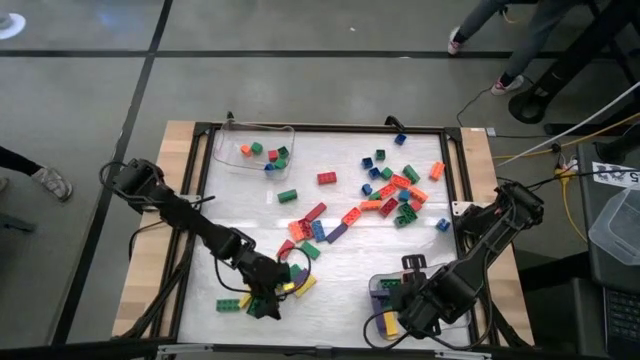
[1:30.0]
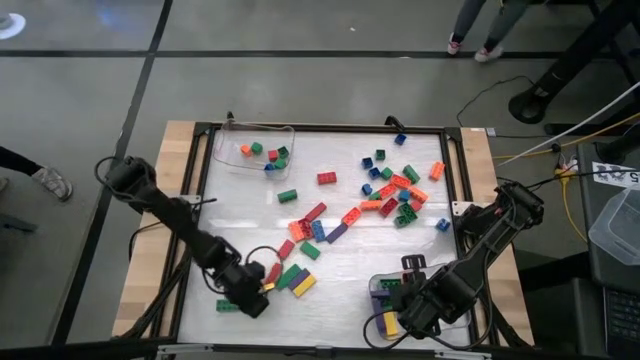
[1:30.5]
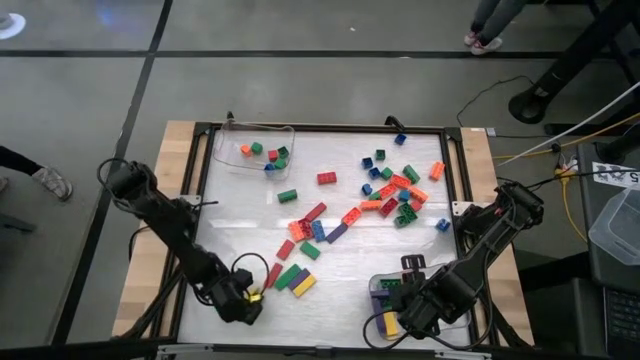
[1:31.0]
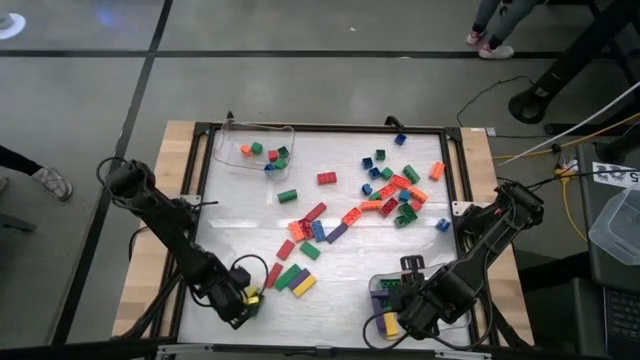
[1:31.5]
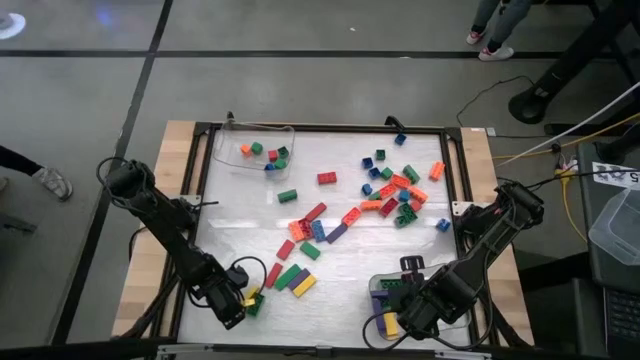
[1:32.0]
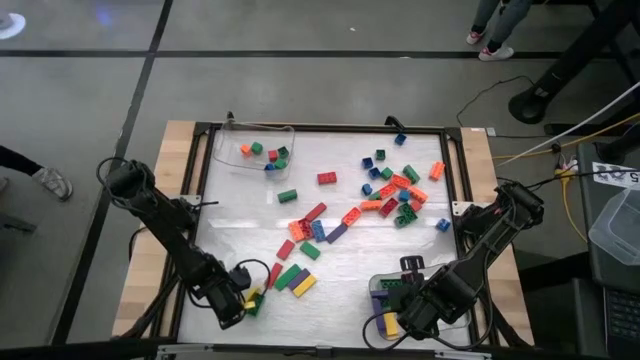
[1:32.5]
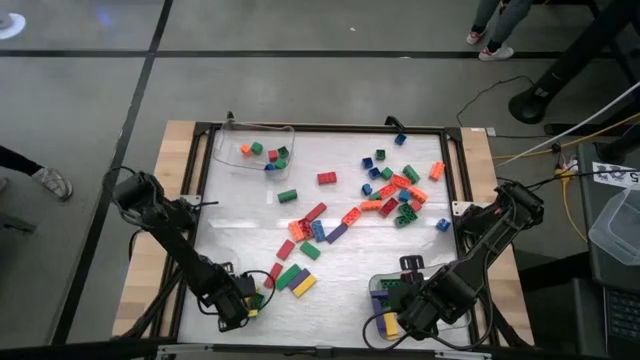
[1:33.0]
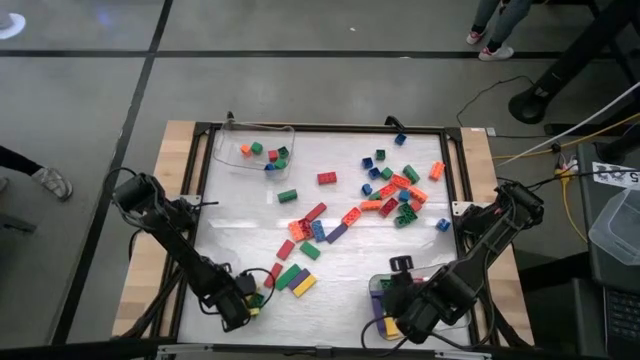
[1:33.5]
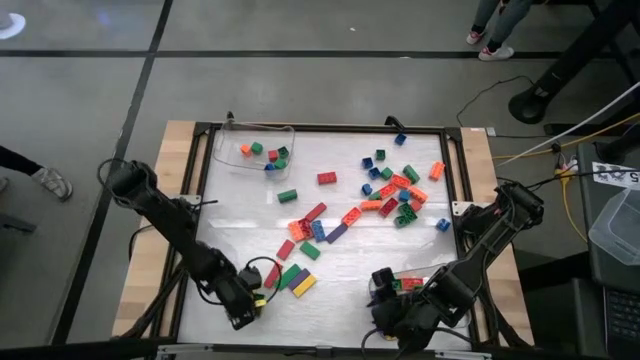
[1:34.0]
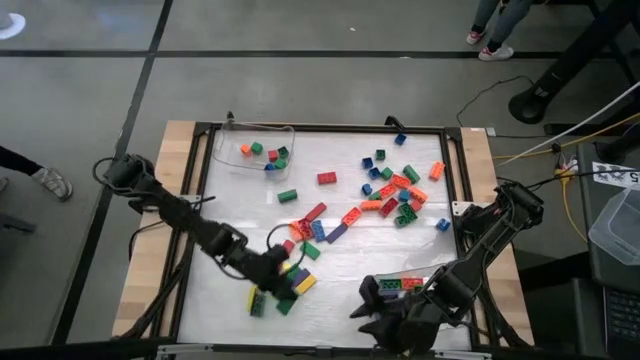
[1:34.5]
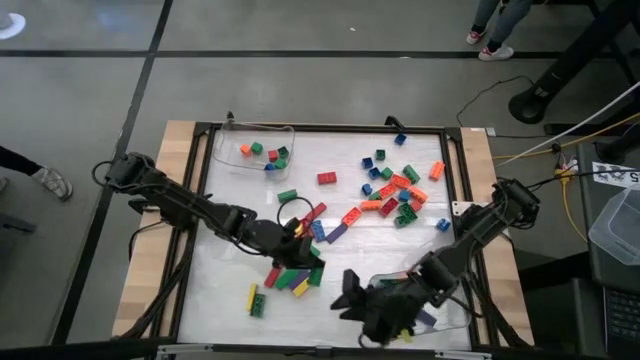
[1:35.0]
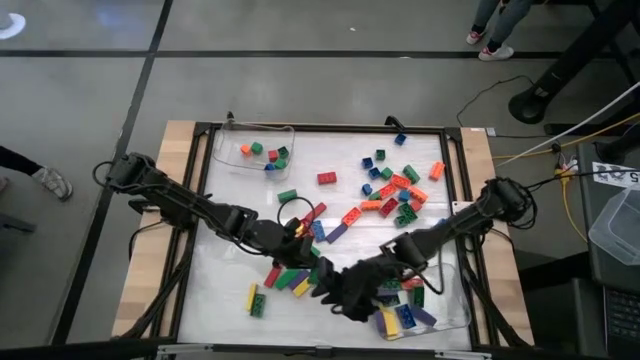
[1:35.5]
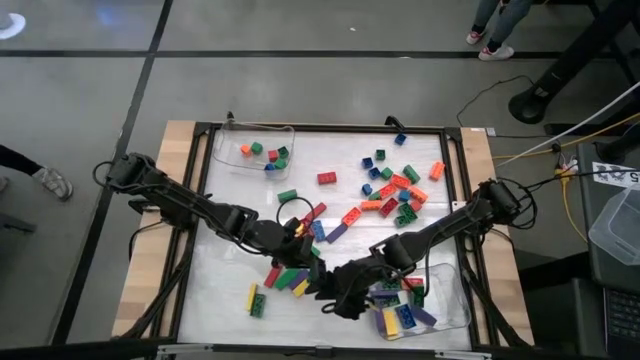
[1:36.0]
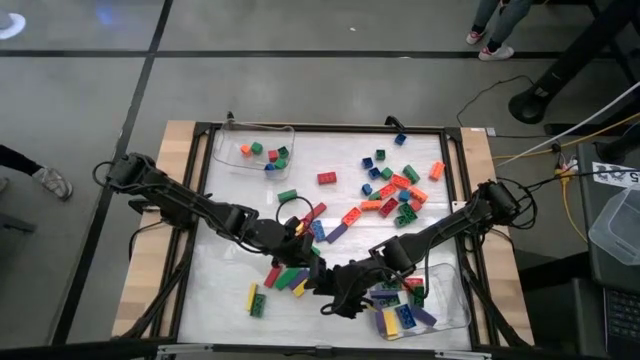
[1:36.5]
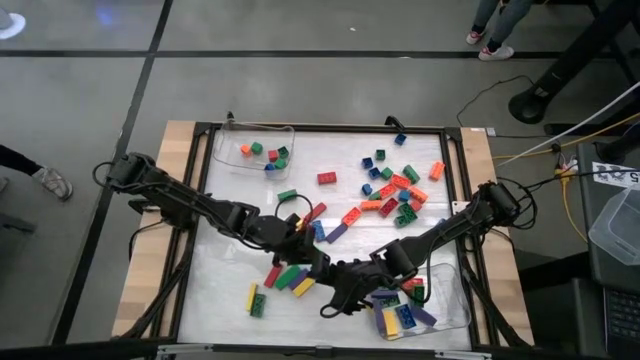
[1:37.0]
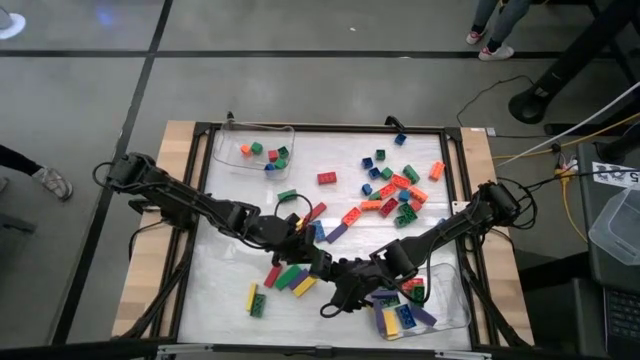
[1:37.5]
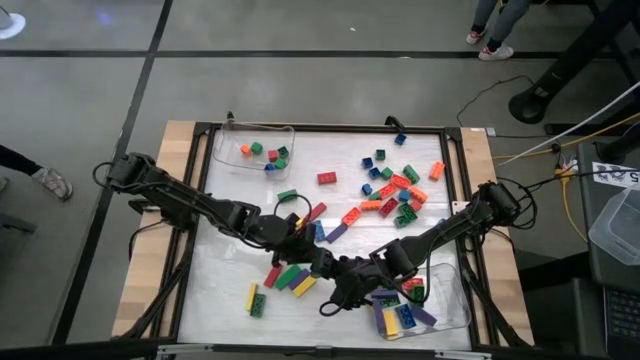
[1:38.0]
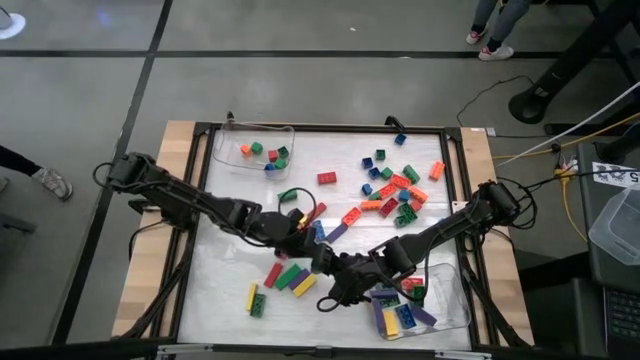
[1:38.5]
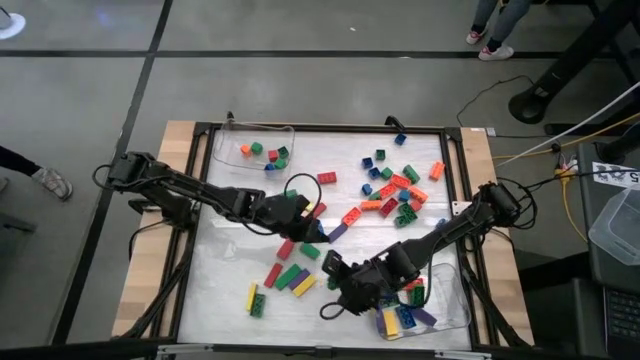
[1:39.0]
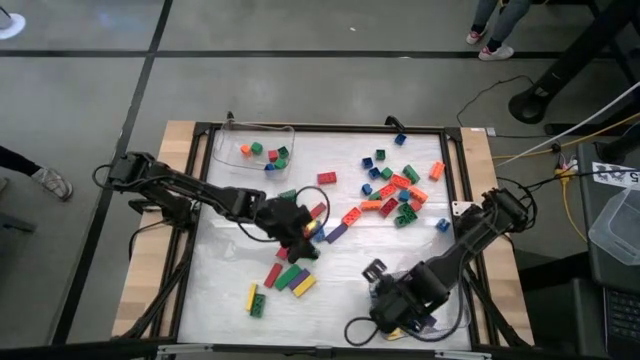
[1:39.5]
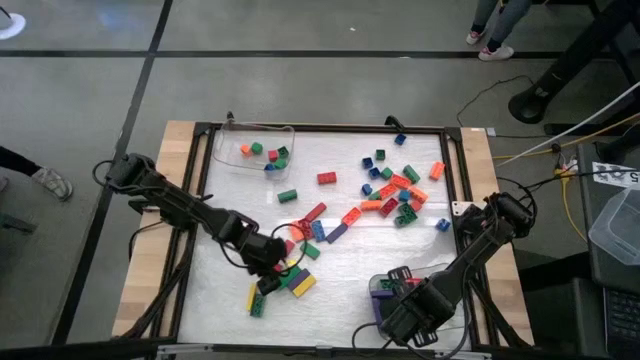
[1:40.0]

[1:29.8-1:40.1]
Task: Sort blocks by size
Put the rectangular green game piece into the bottom transparent bin

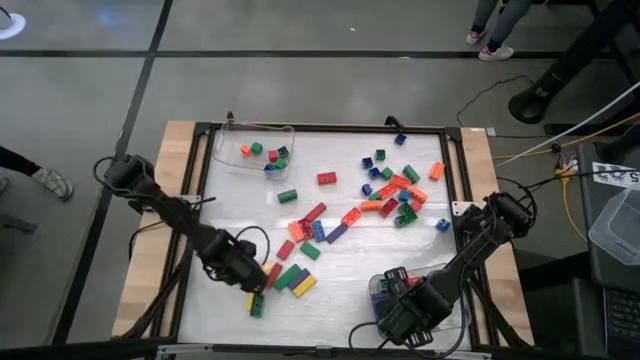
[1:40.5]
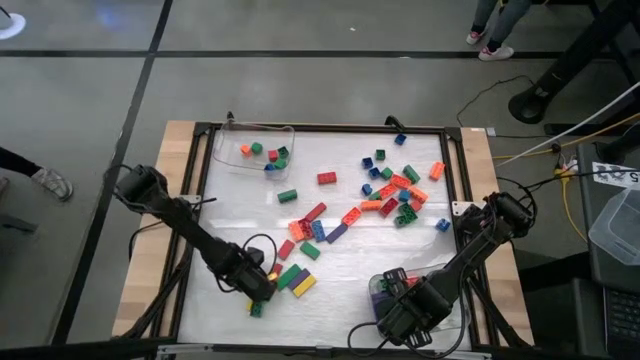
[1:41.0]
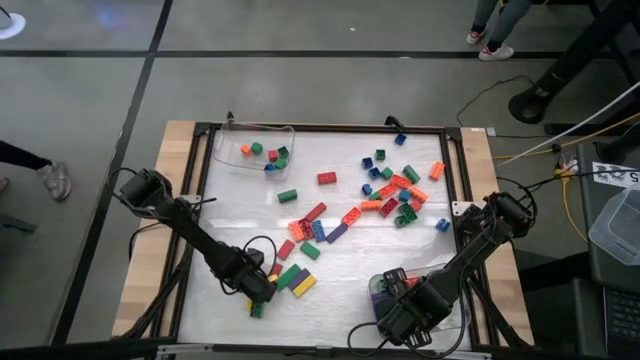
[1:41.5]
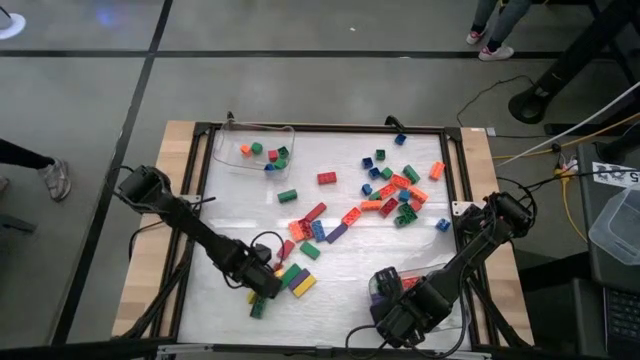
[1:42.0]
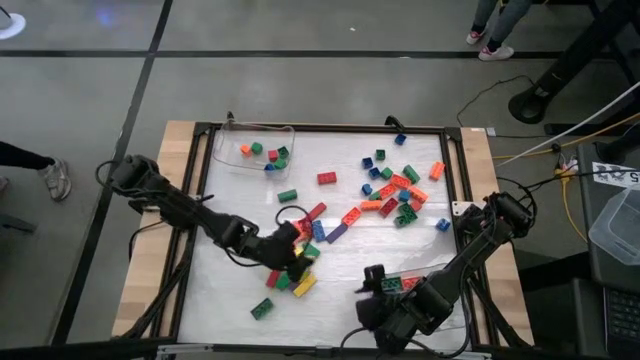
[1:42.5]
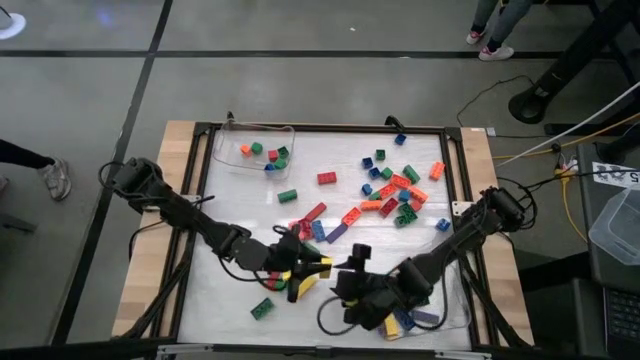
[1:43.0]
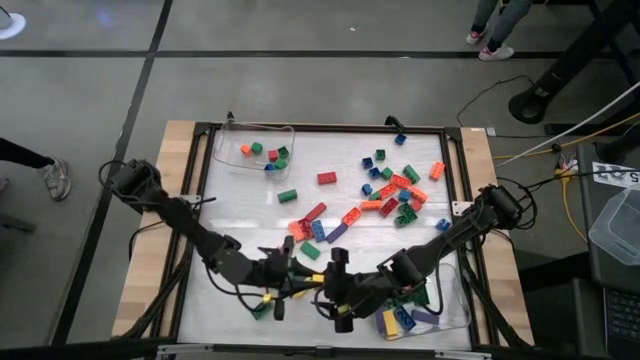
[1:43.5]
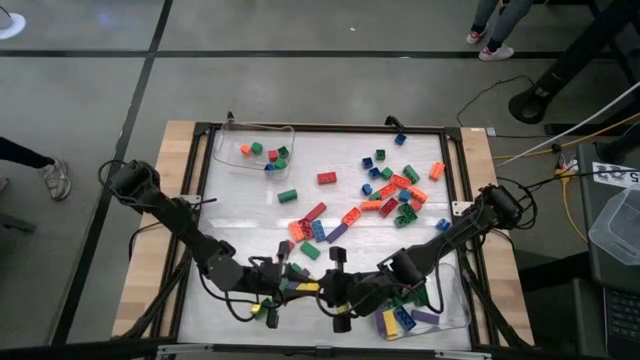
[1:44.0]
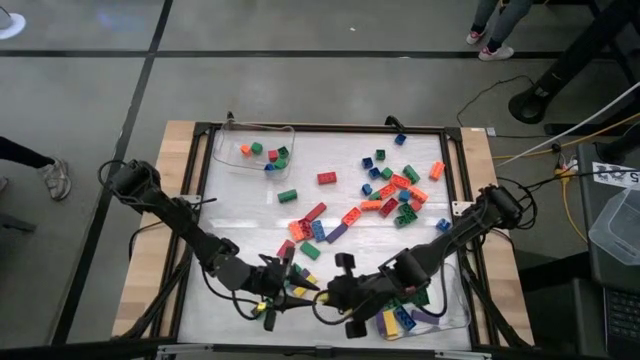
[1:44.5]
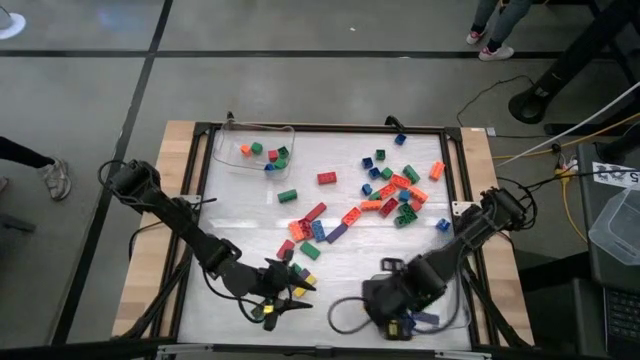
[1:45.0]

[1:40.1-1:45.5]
Put the rectangular yellow game block into the bottom transparent bin

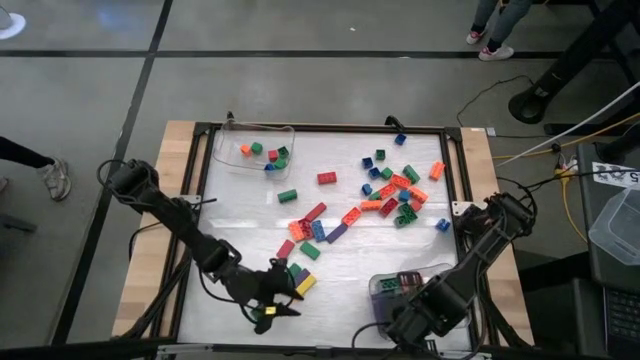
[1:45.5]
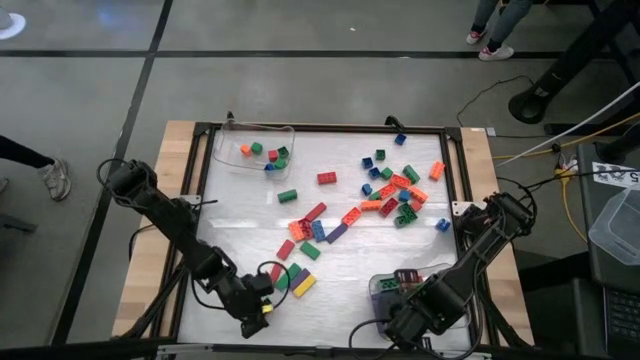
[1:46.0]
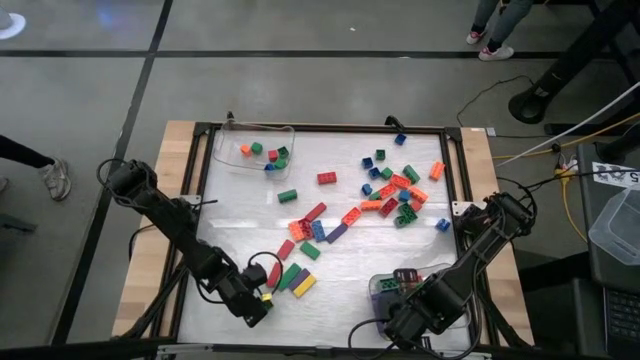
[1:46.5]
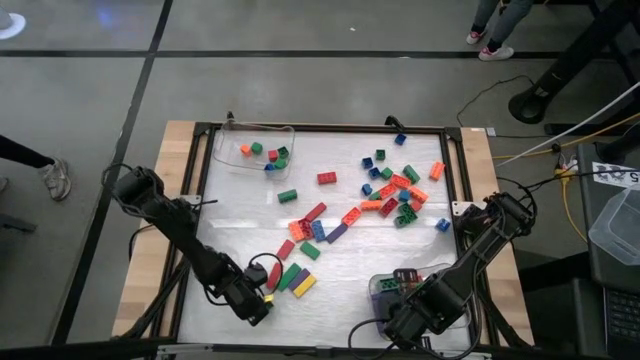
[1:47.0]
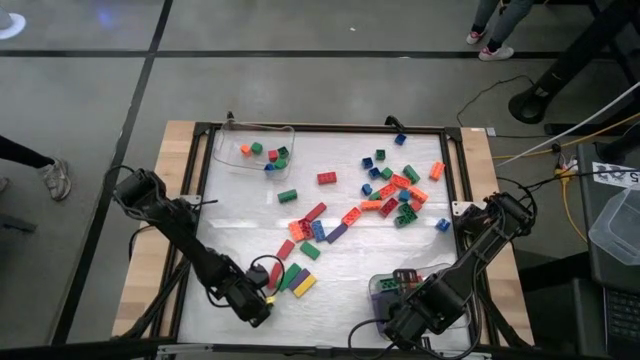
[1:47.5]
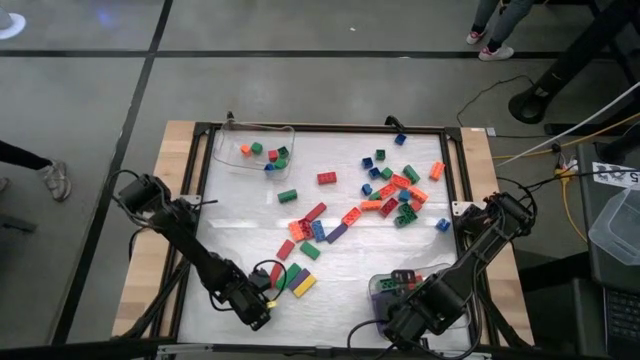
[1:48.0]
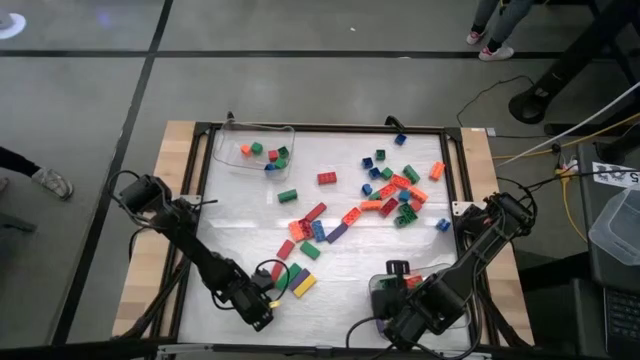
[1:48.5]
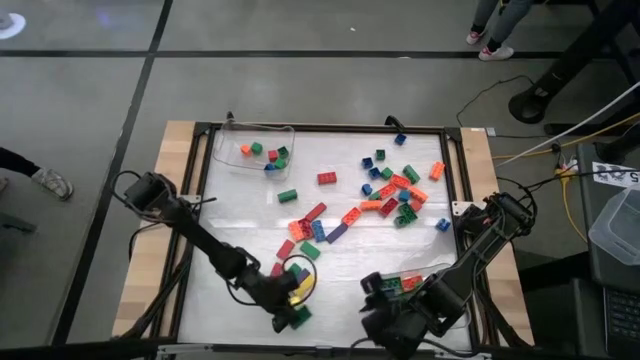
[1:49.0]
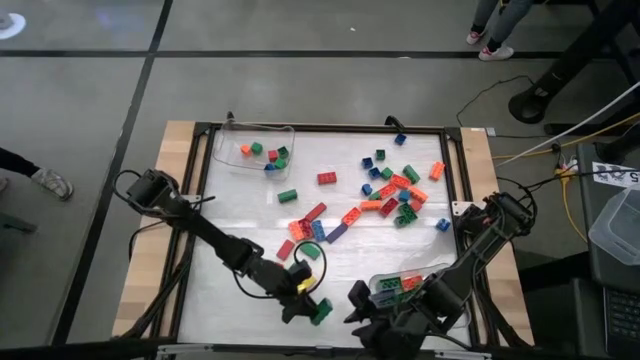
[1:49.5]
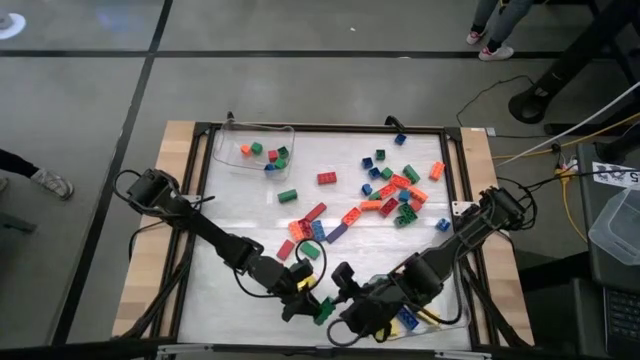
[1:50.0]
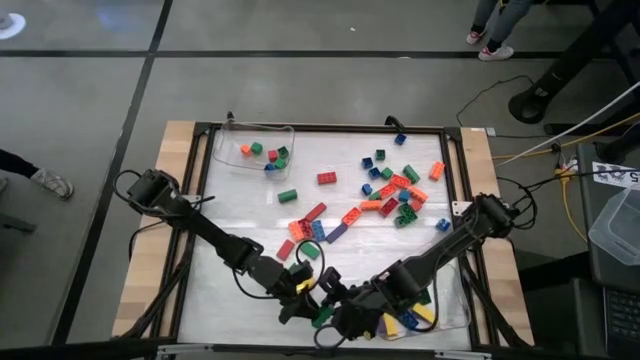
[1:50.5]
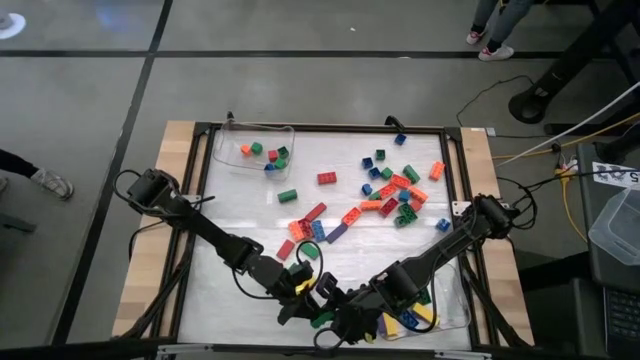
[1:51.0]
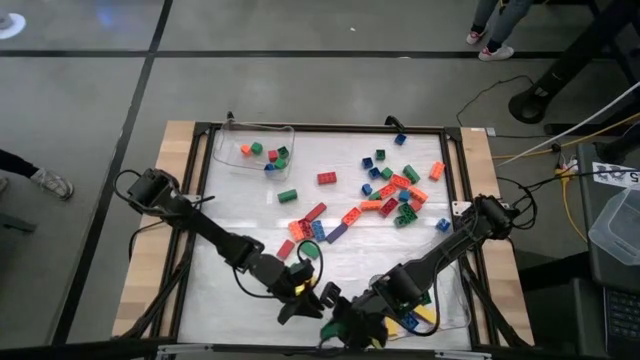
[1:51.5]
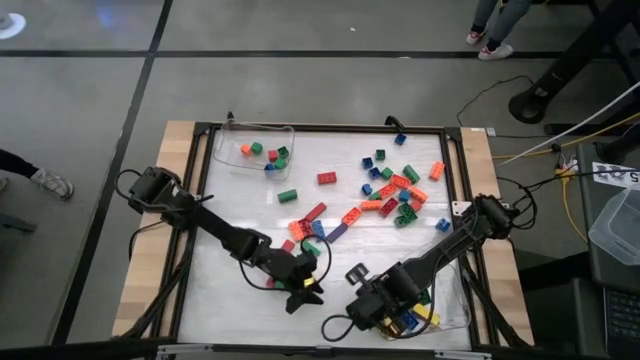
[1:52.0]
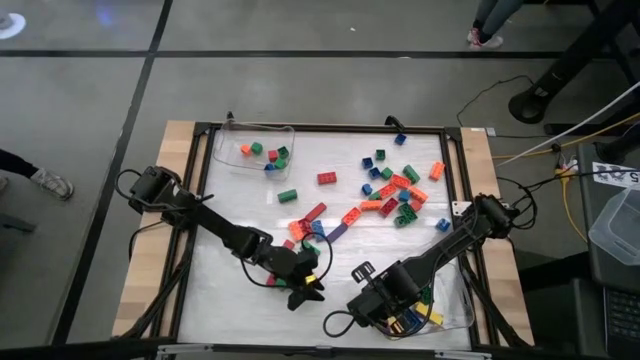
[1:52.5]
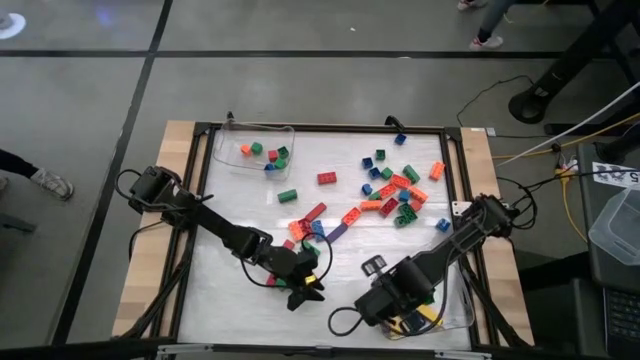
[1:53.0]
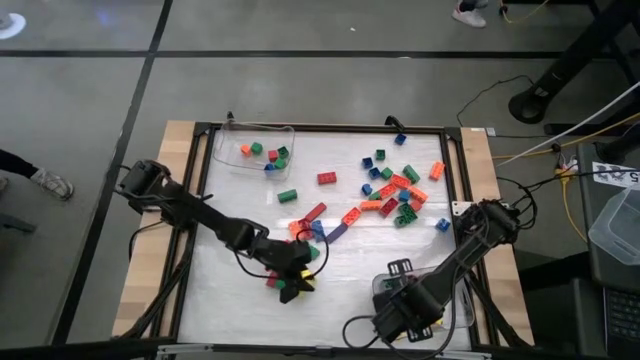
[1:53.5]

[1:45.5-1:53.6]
Put the rectangular green game piece into the bottom transparent bin
